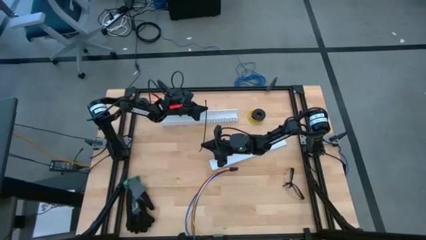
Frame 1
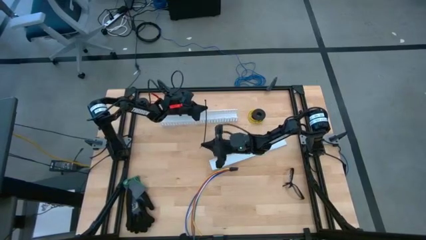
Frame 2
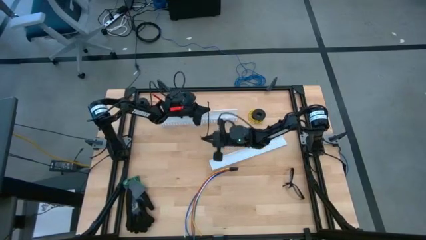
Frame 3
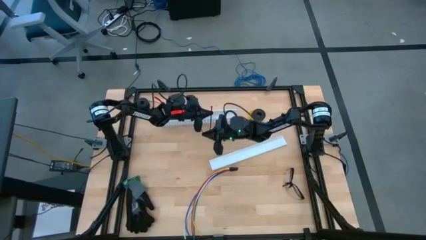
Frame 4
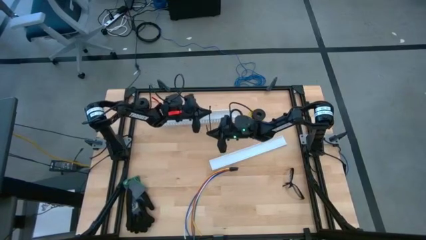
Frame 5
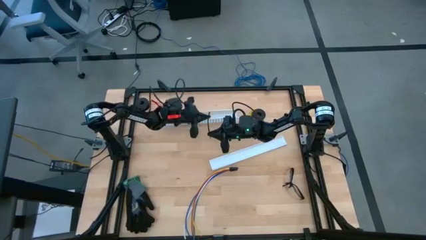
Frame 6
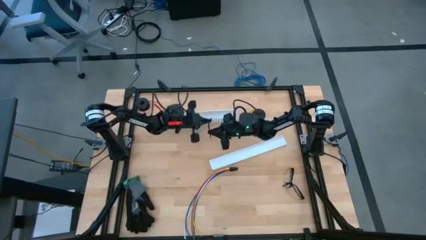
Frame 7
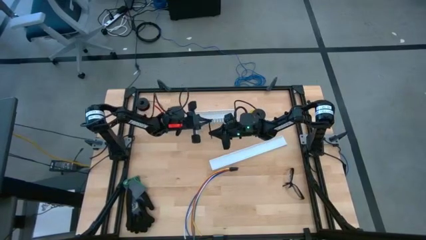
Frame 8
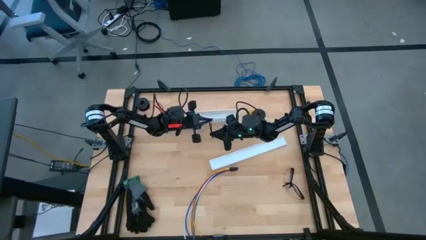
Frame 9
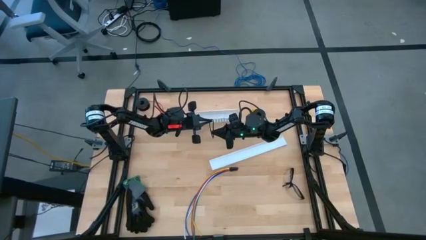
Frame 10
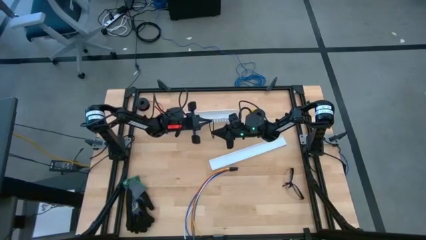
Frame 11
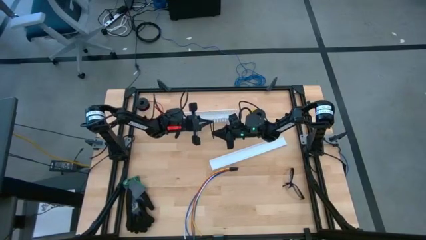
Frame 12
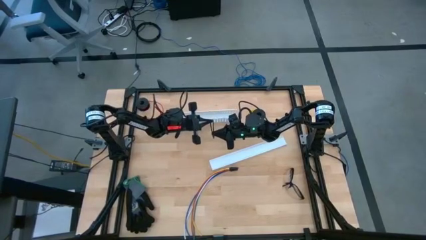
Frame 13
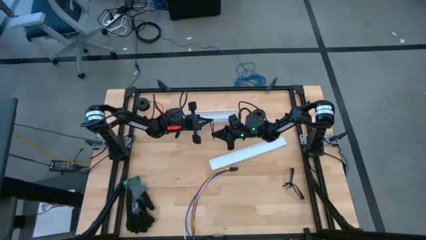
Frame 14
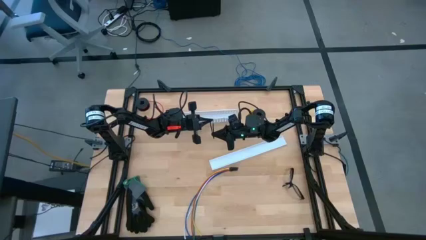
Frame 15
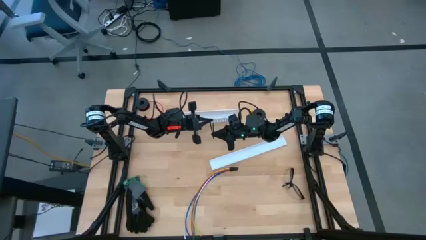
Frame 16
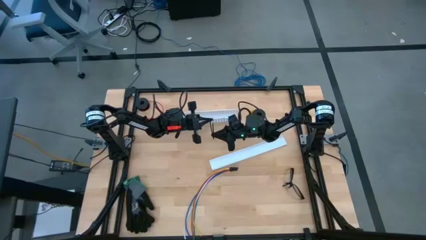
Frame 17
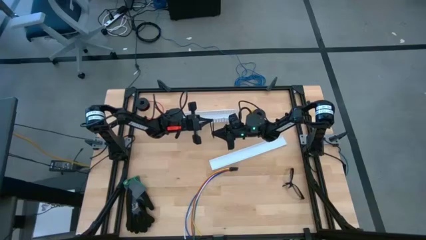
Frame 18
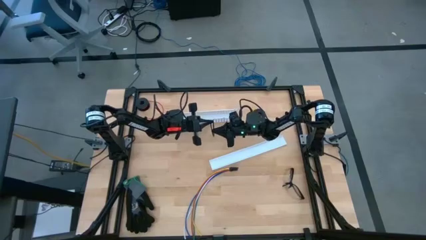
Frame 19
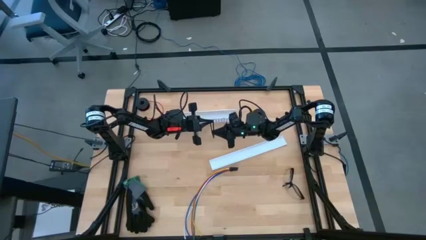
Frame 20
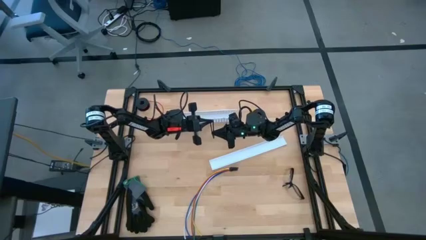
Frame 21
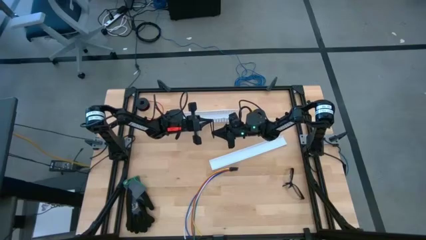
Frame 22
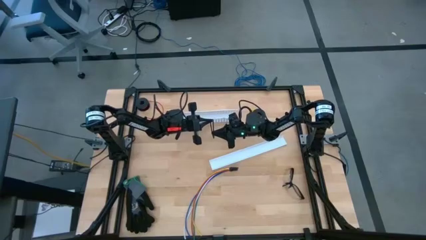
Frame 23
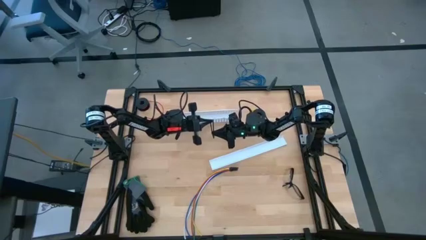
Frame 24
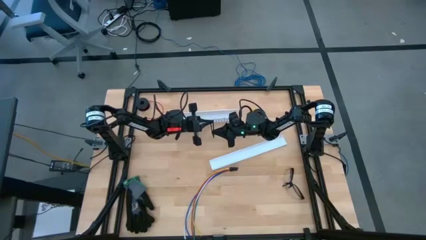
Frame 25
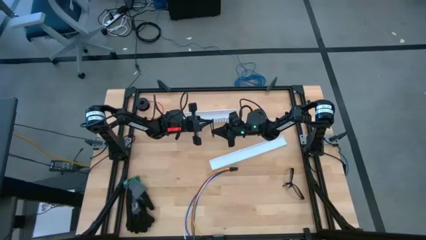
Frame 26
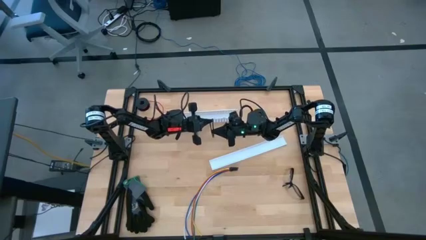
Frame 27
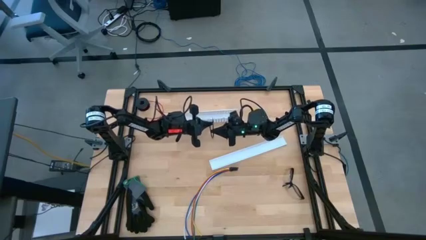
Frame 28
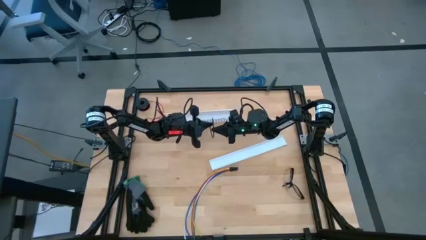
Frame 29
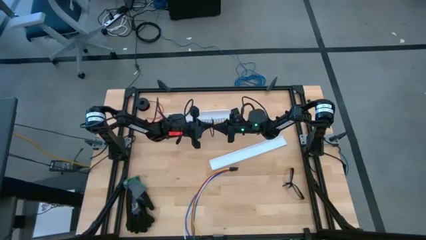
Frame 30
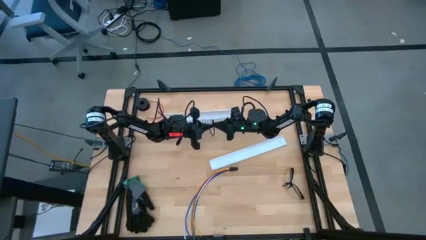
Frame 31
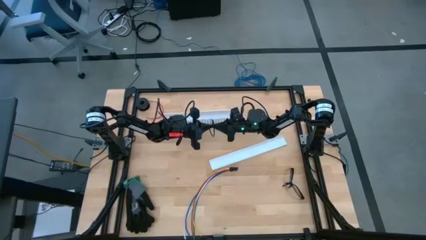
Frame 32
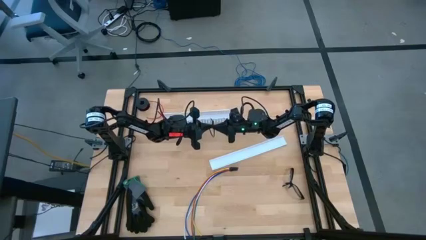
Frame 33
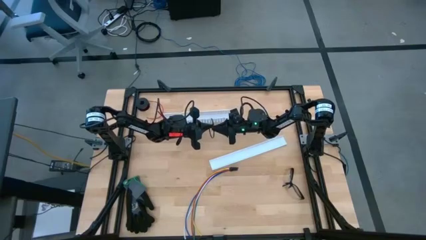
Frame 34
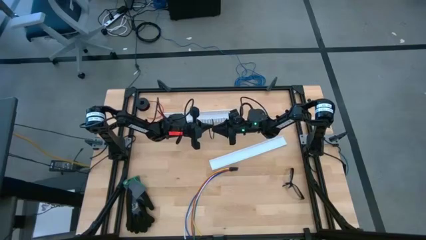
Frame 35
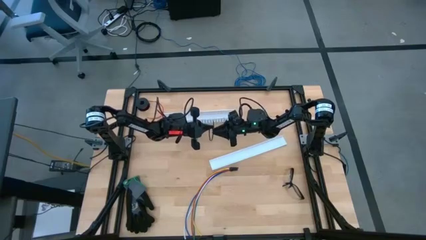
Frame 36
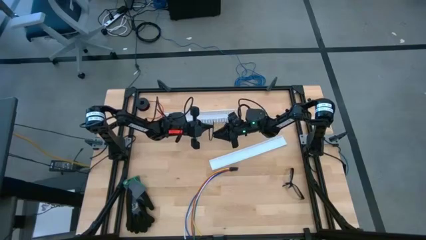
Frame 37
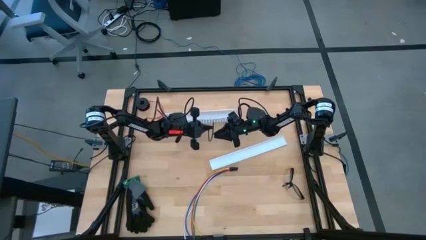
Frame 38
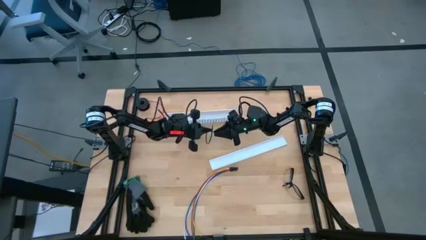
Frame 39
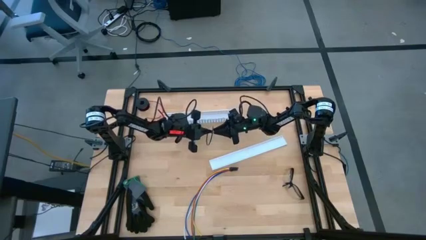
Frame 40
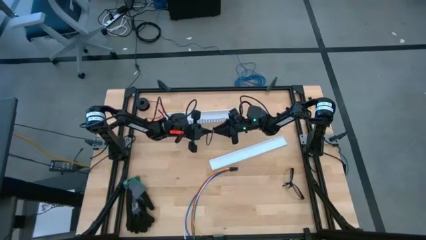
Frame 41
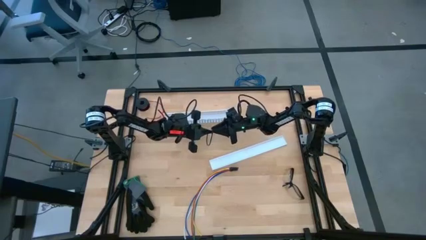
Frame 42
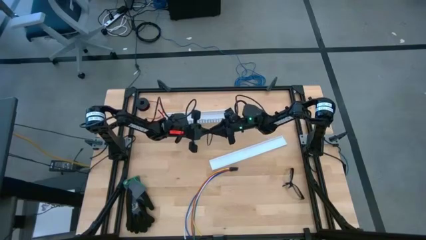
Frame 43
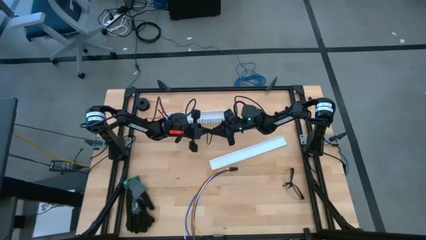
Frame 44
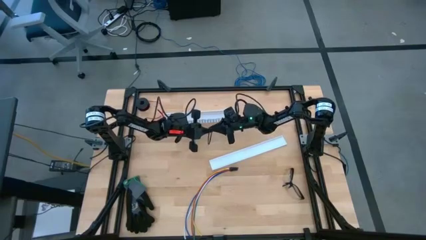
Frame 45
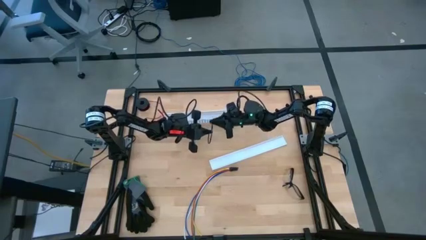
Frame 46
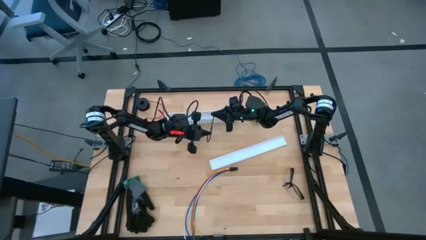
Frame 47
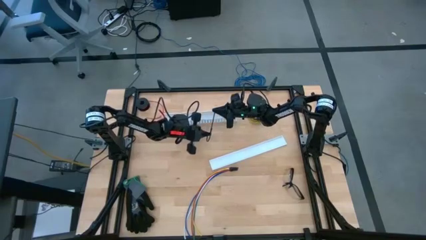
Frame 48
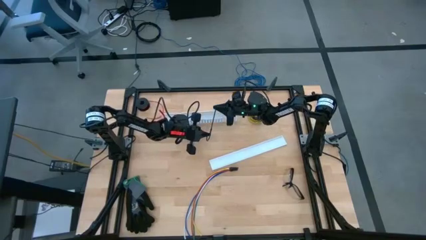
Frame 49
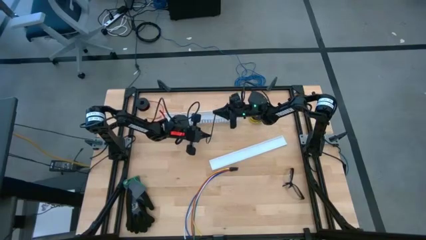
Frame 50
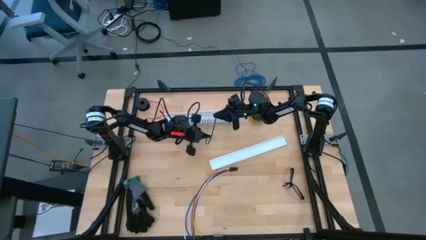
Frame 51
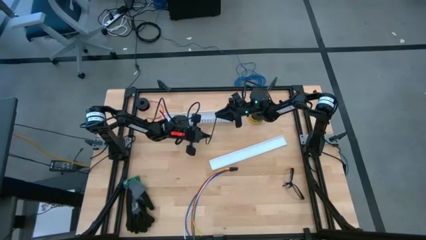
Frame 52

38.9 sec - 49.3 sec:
Task: Ziptie cables
Wrap the cables together using the black zip tie
